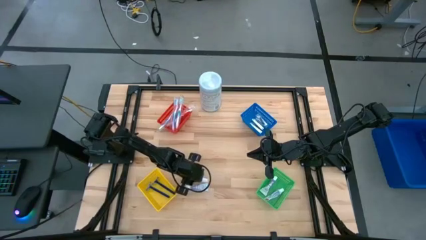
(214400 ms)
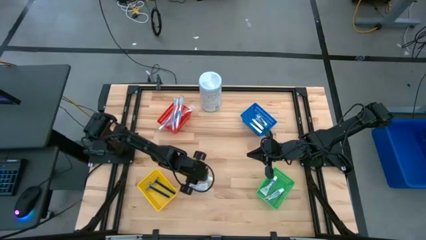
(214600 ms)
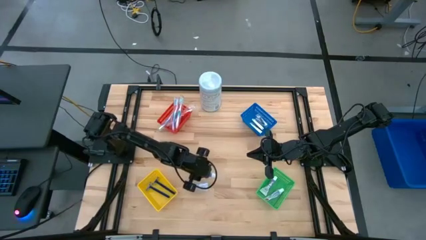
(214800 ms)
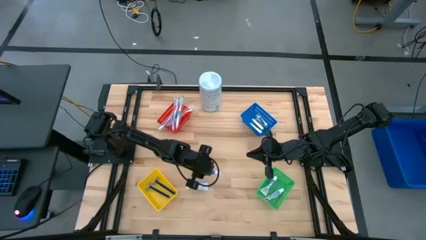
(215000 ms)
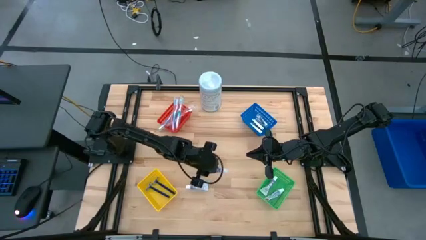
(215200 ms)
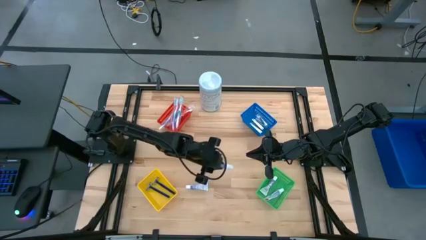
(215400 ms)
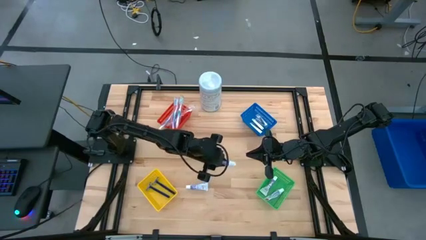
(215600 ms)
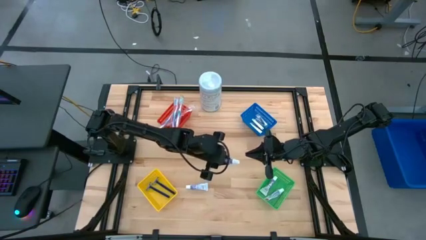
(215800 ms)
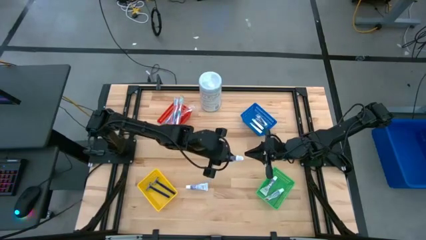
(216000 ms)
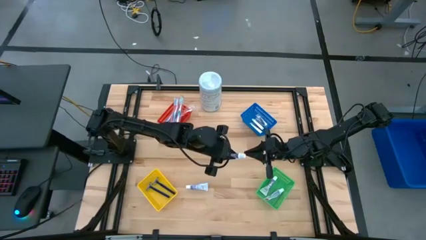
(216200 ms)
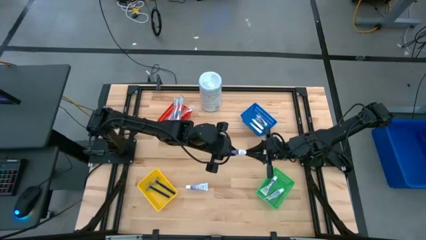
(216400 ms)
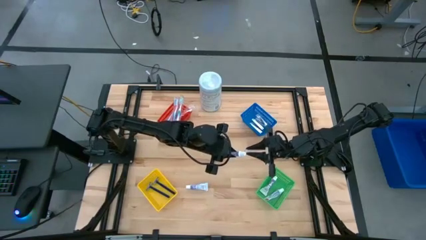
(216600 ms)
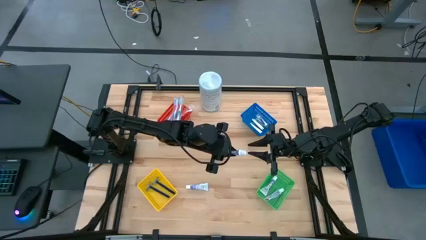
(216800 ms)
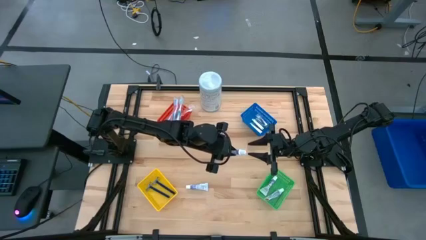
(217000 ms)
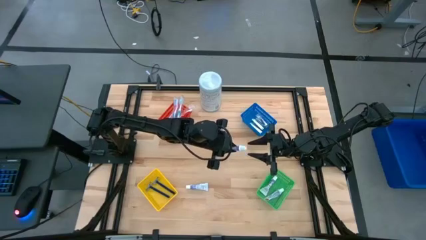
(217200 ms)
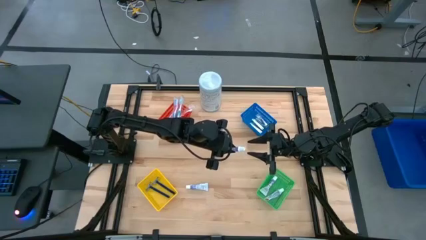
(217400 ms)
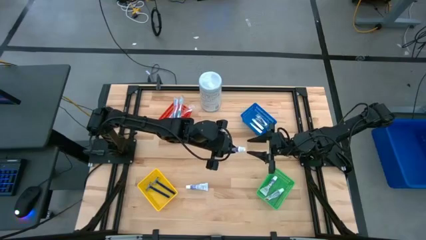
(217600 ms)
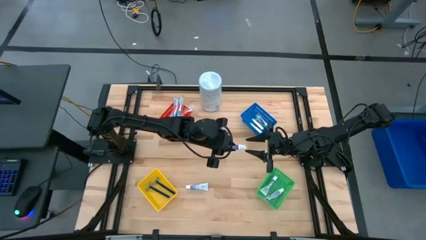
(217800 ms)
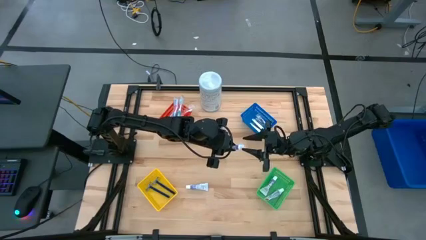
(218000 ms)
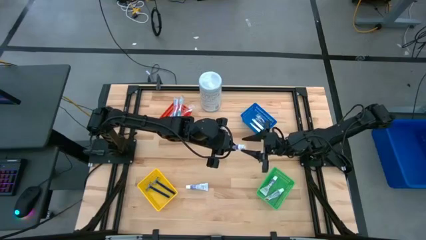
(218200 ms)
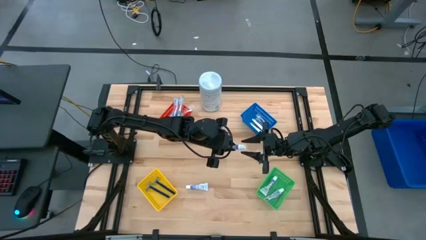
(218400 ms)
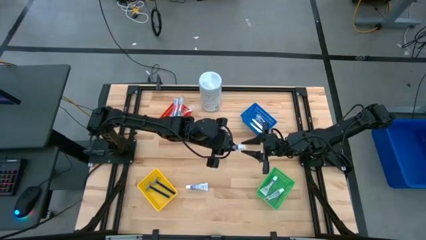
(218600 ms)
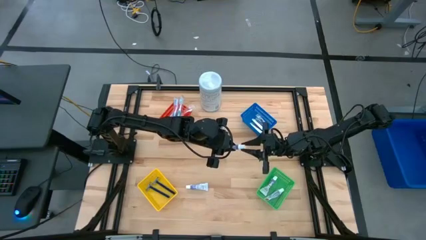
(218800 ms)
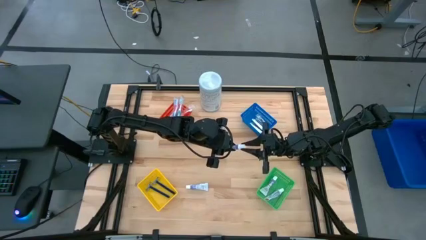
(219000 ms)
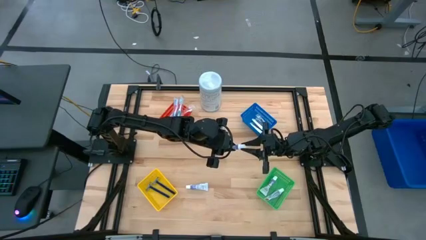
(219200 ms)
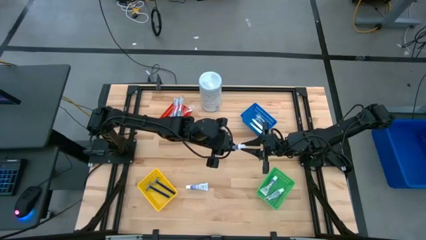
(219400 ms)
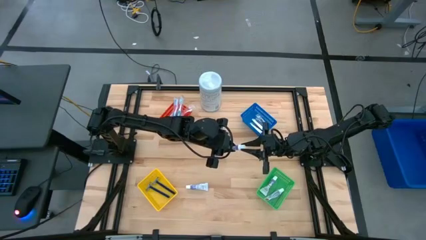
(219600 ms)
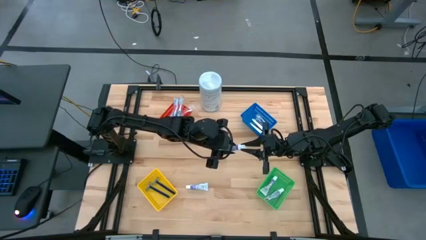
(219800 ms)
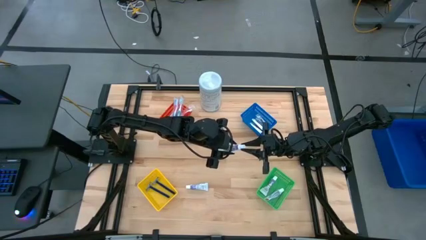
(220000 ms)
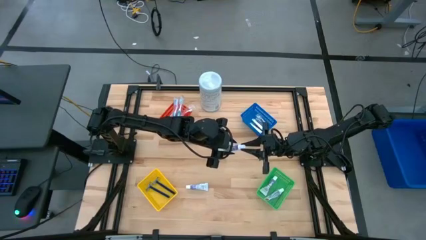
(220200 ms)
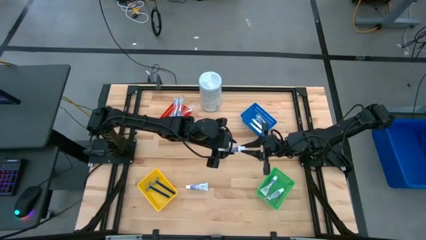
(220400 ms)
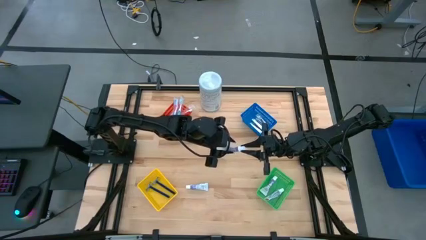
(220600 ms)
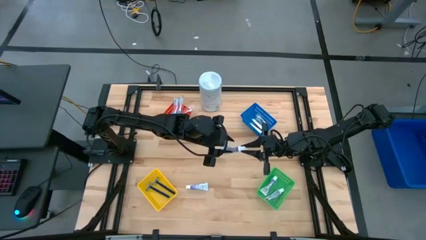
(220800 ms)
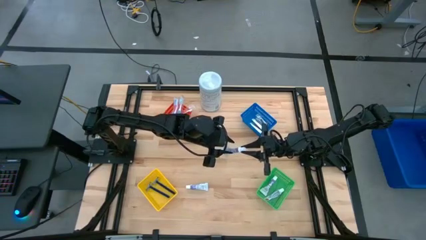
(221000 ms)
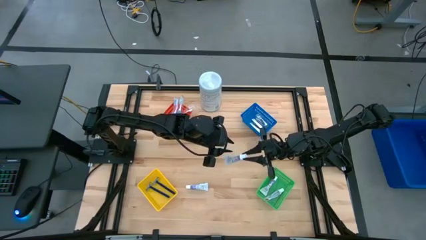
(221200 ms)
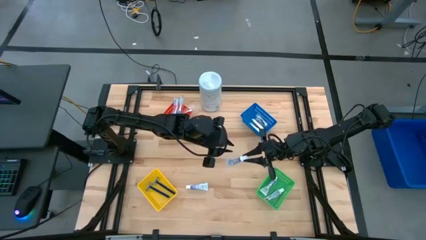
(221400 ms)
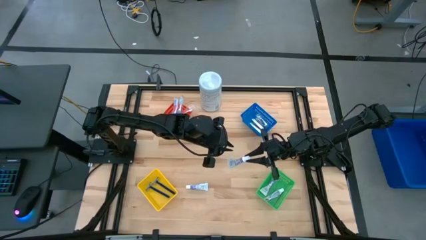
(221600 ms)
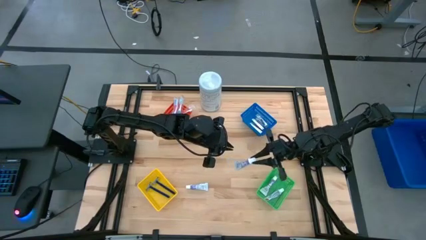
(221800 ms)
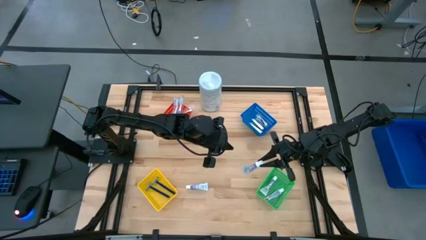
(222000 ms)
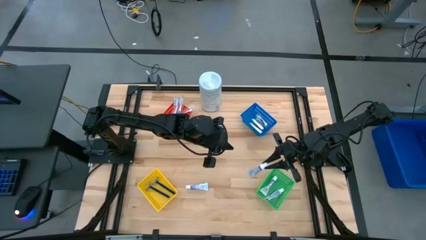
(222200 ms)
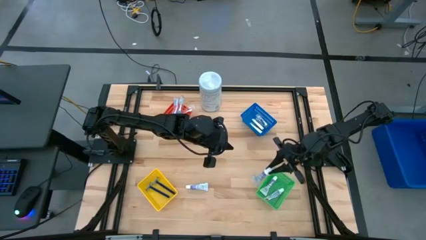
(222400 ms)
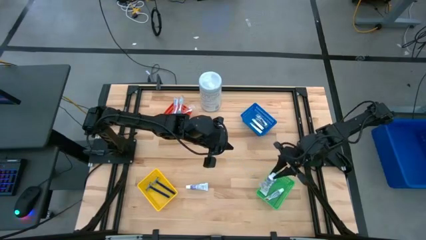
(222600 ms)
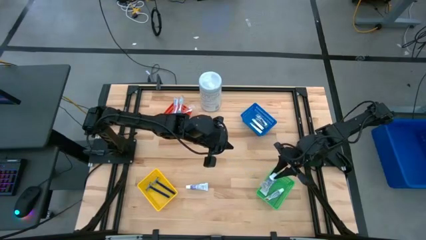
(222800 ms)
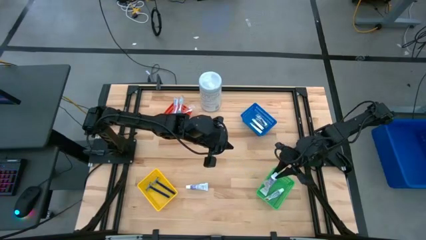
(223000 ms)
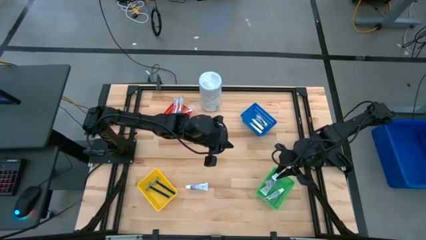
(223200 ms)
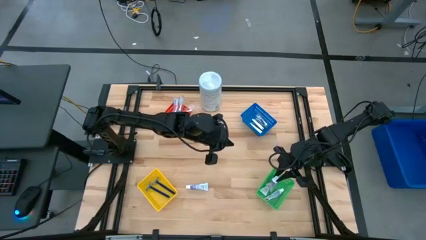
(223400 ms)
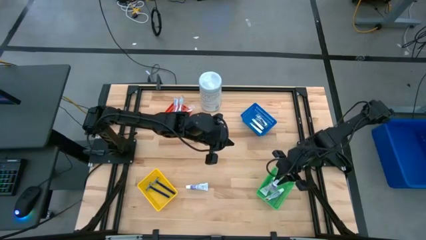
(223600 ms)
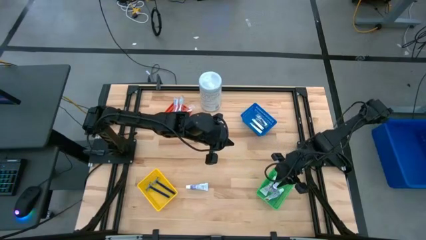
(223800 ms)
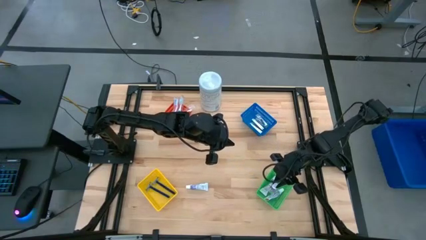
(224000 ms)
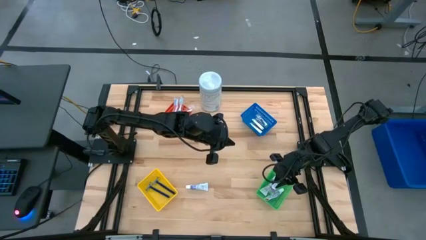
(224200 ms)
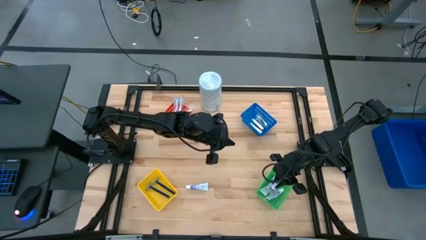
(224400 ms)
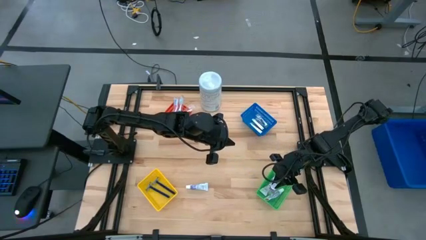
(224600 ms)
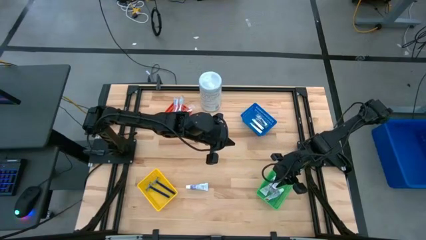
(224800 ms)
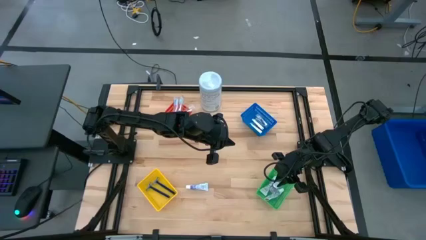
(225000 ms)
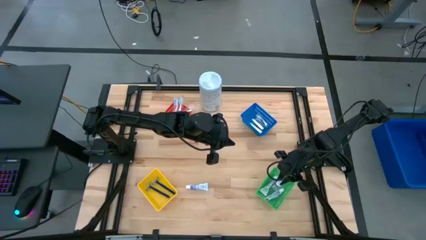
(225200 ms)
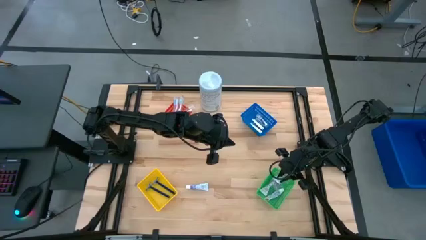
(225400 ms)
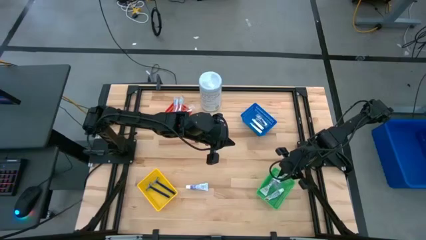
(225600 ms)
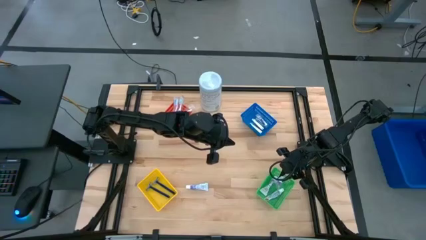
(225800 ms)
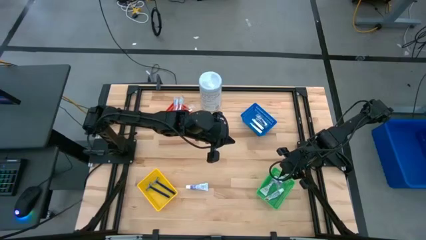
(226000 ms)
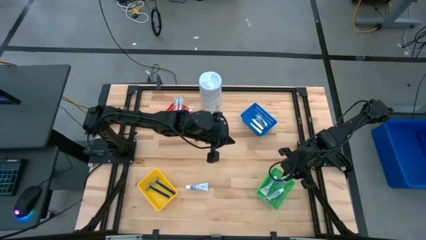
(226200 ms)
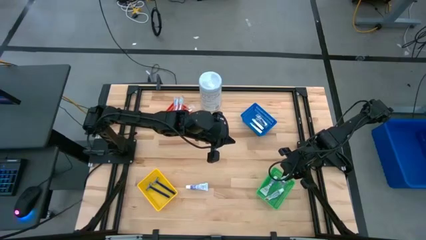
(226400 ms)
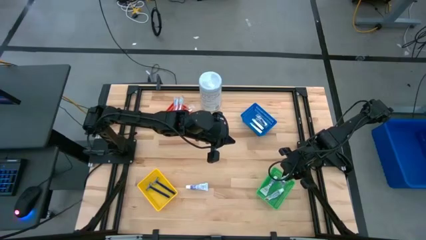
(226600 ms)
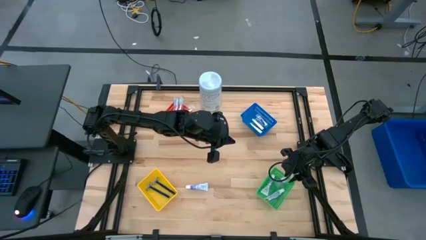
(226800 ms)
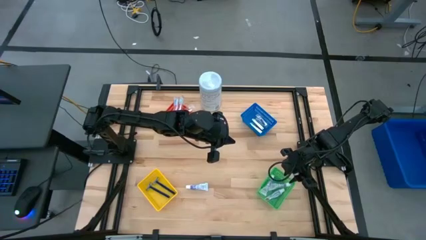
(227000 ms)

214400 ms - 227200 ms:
Task: Pick & Place Travel size toiletries
Put the white toothpaste into the green basket

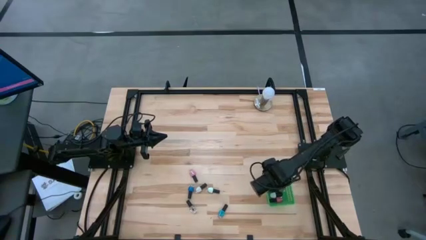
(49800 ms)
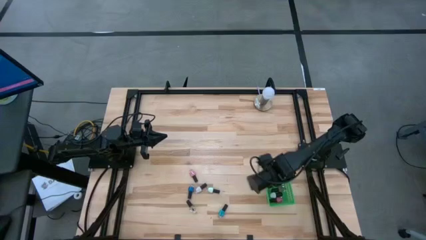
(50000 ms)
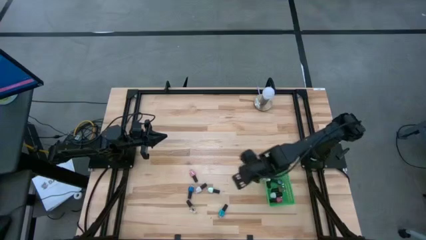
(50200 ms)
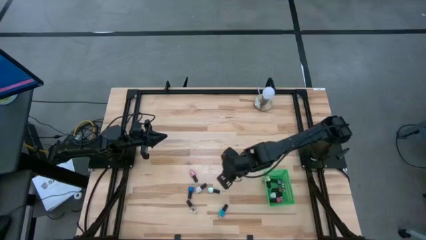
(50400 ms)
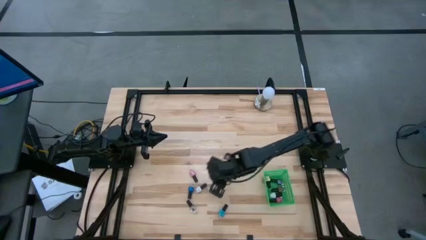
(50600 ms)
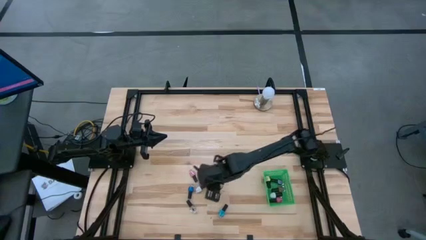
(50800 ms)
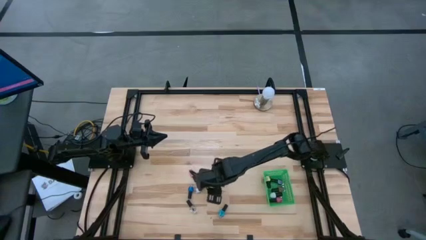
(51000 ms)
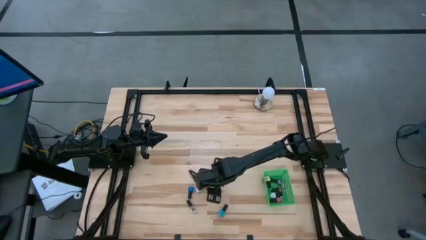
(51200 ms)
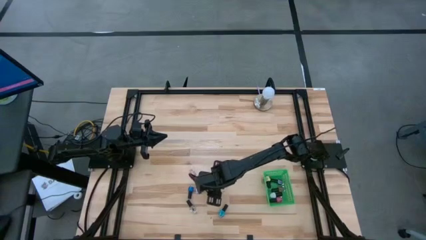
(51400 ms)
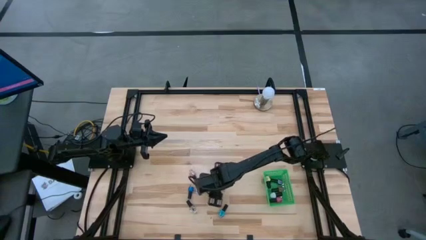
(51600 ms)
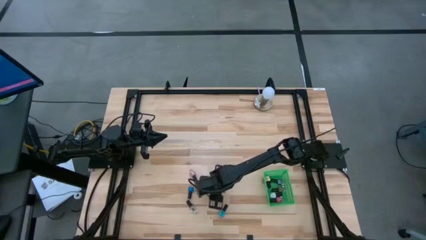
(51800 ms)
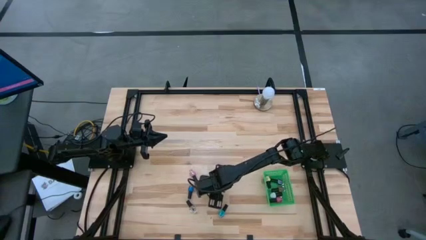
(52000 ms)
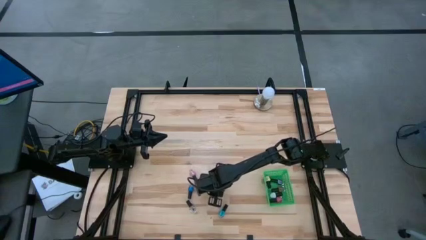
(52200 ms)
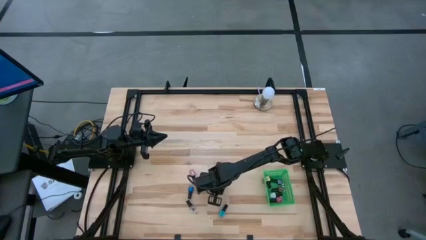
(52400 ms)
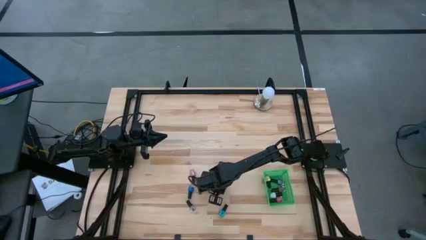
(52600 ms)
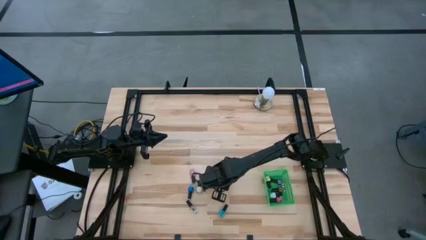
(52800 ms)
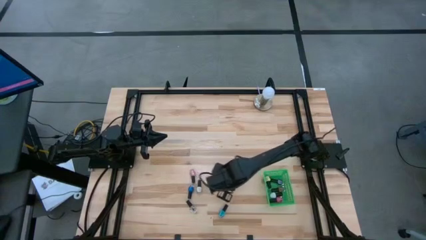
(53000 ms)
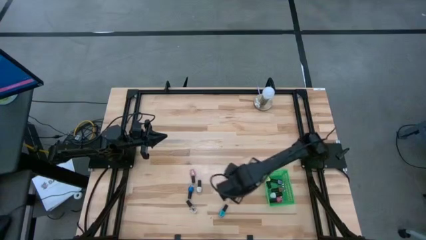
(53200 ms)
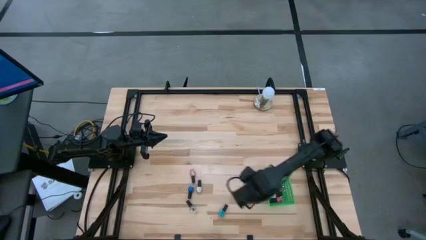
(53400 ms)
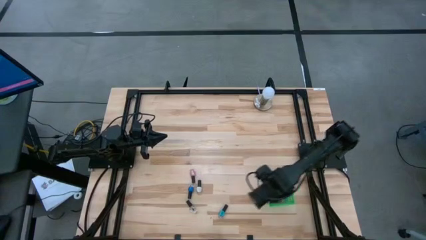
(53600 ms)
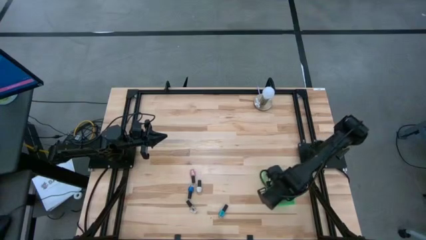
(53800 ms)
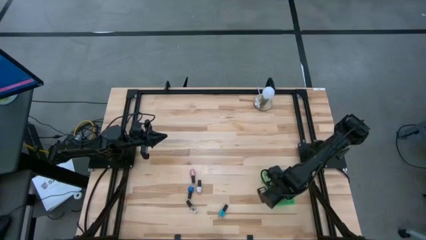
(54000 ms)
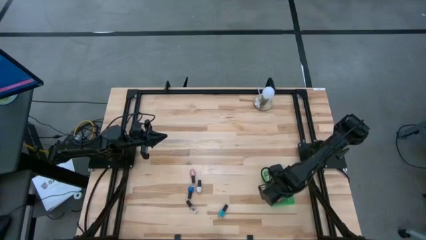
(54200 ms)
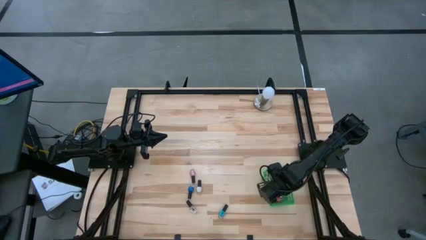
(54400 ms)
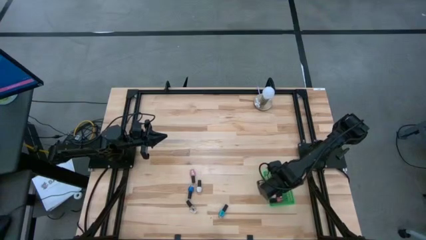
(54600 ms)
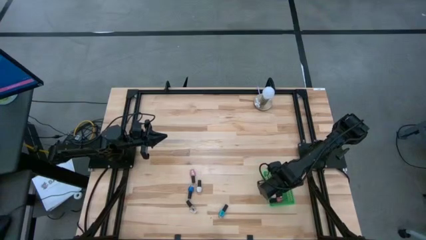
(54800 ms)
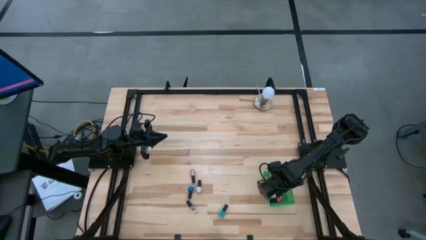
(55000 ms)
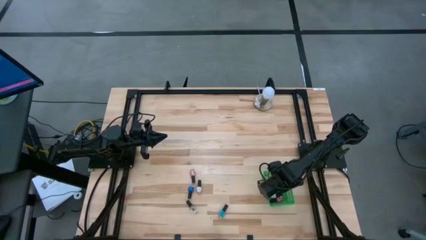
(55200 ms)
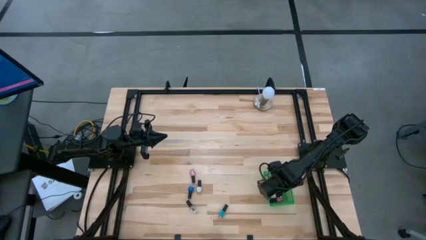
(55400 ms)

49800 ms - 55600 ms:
Task: Pick & Place Nail Polish
Put the right white nail polish into the green bin
